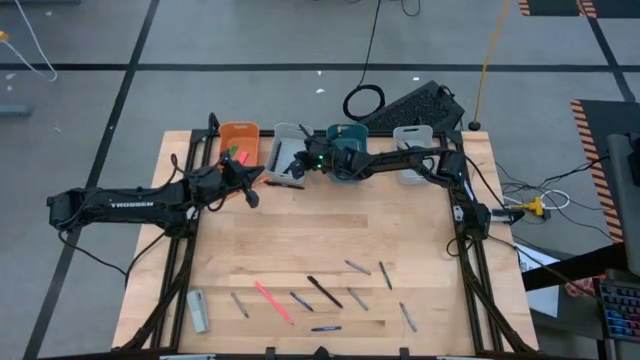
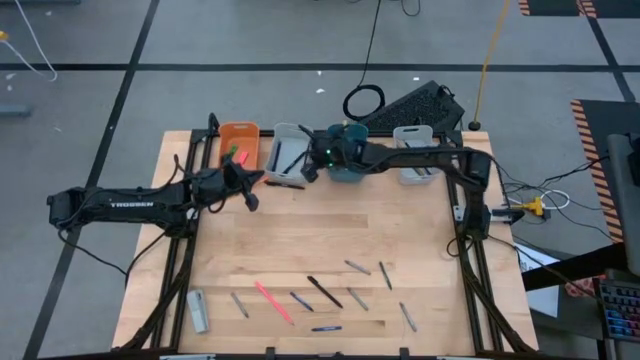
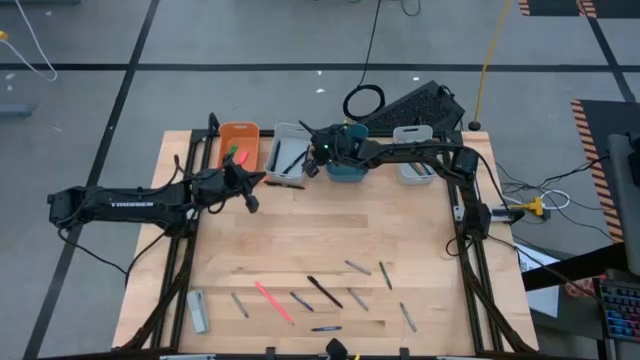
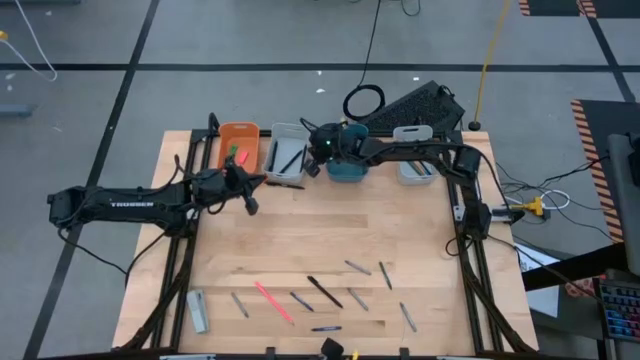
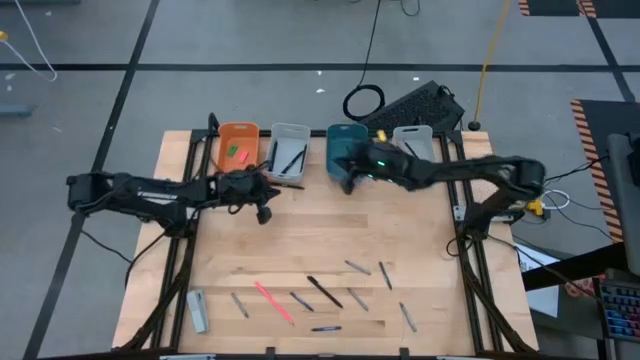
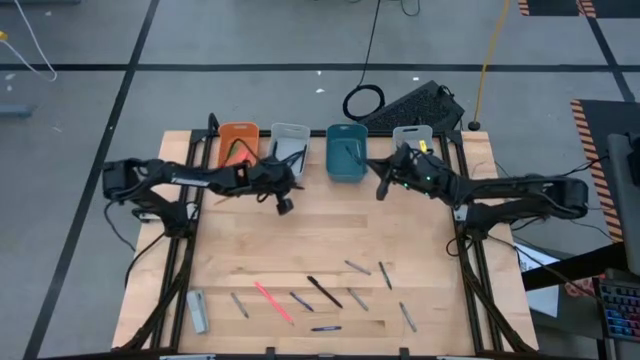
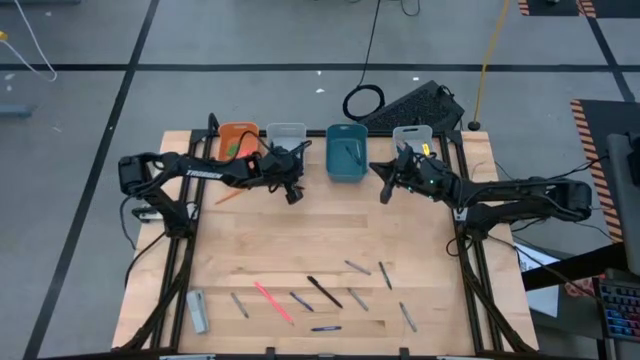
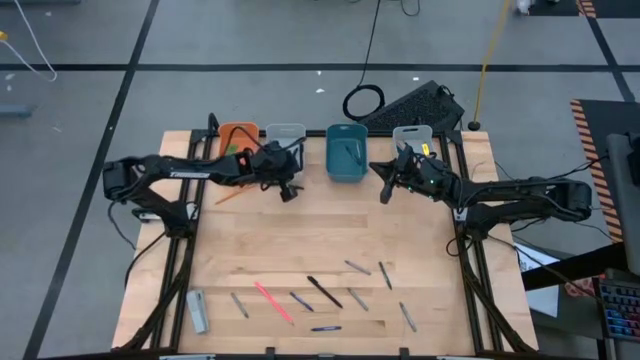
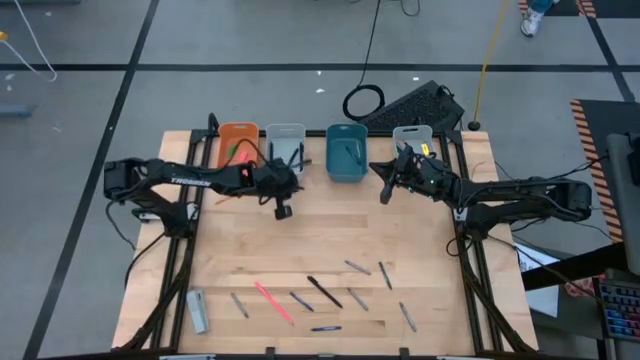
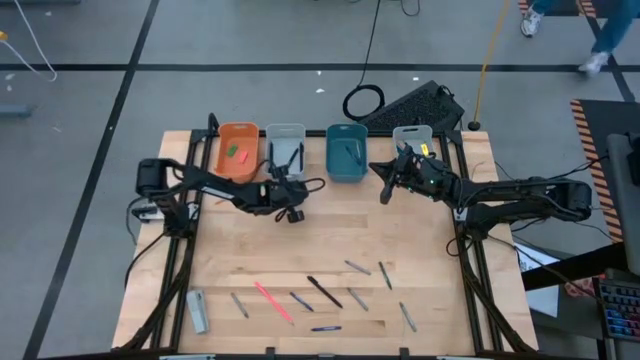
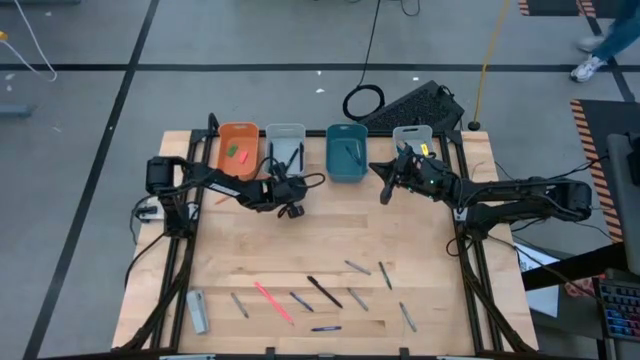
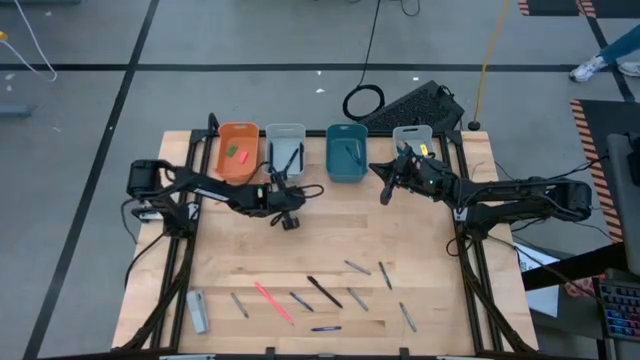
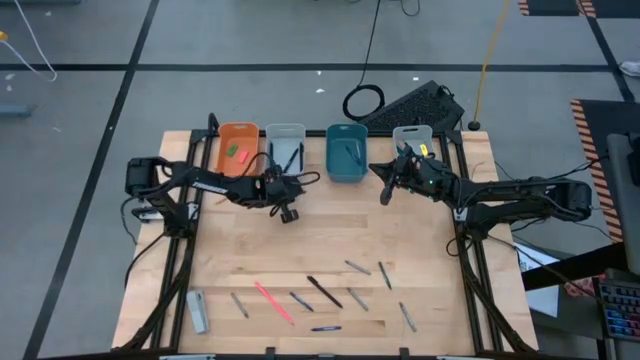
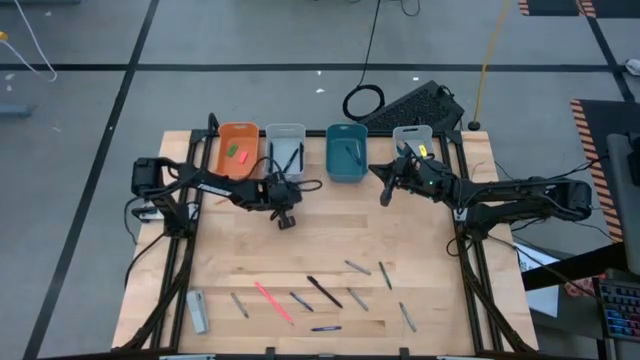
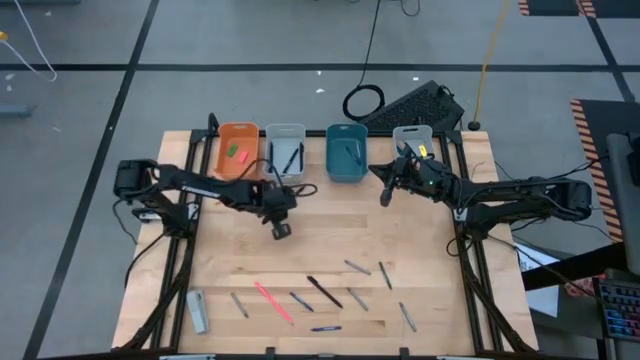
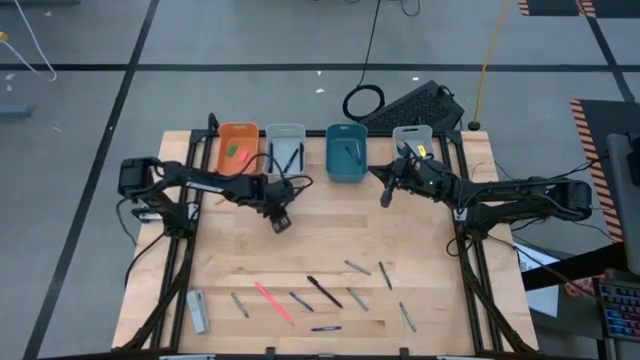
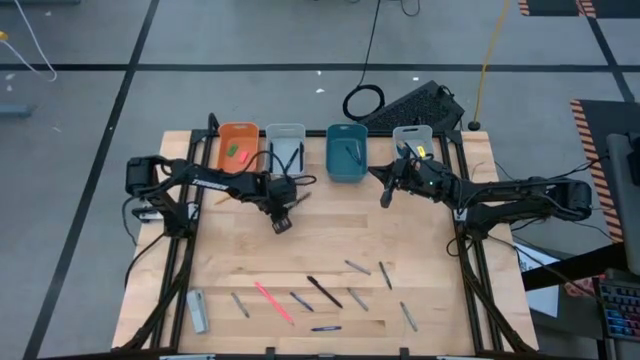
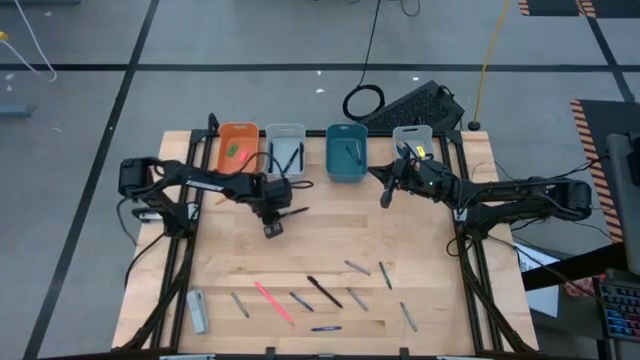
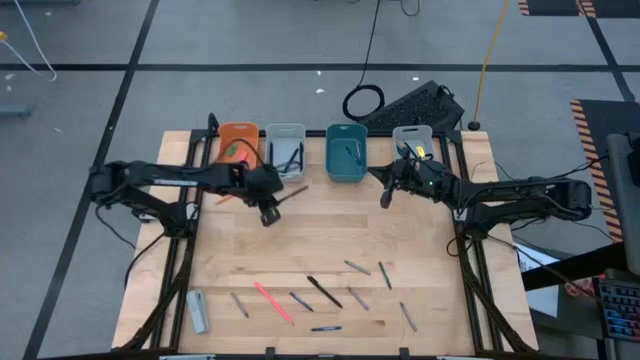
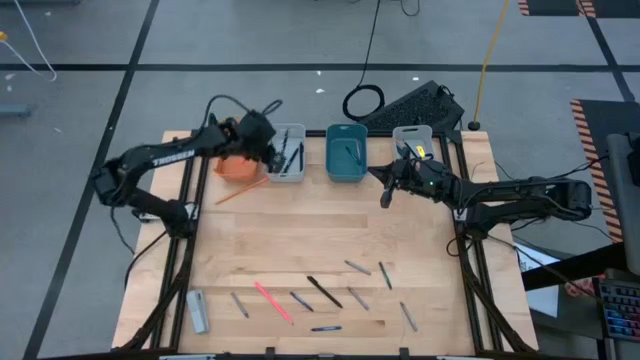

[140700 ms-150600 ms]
Task: Sort crayons/erasers/pens/pencils in bins
Put the black pen into the left gray bin

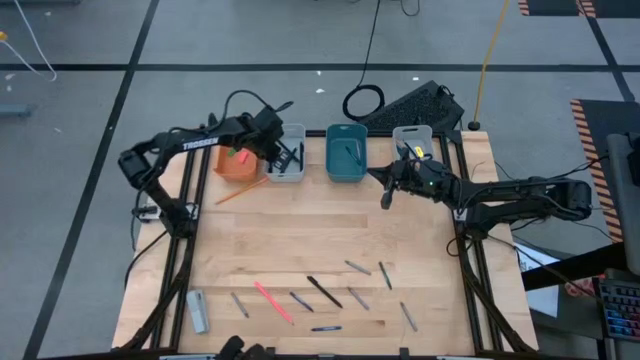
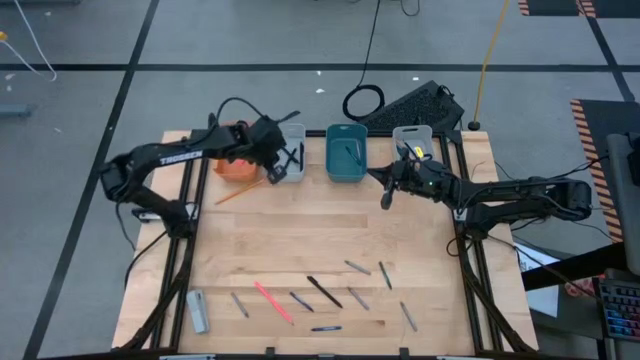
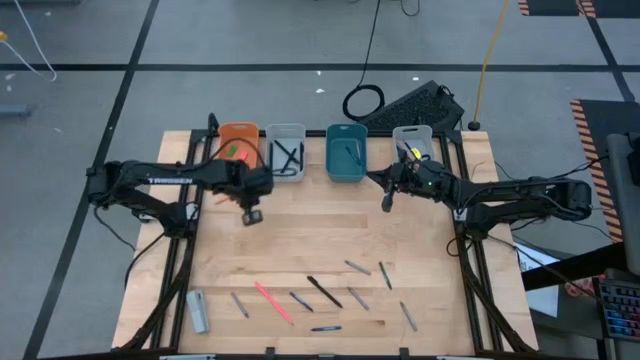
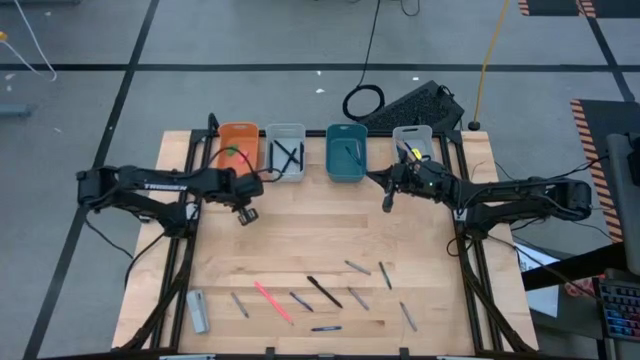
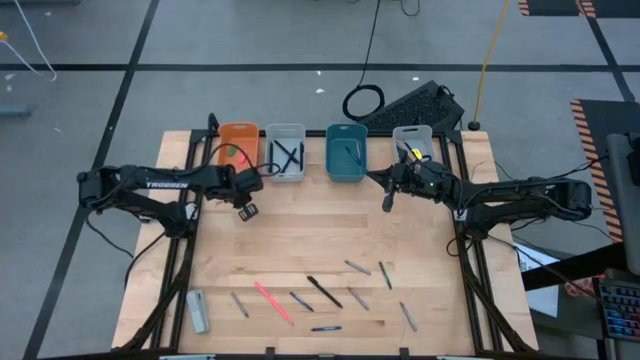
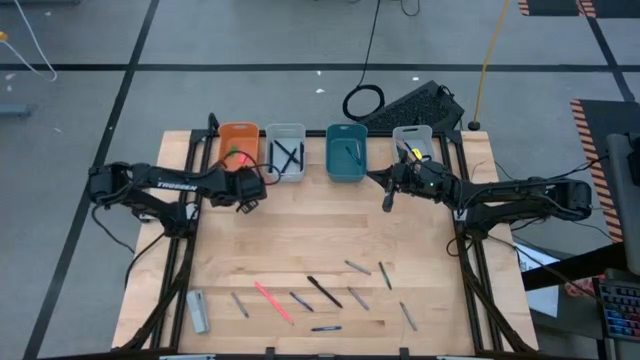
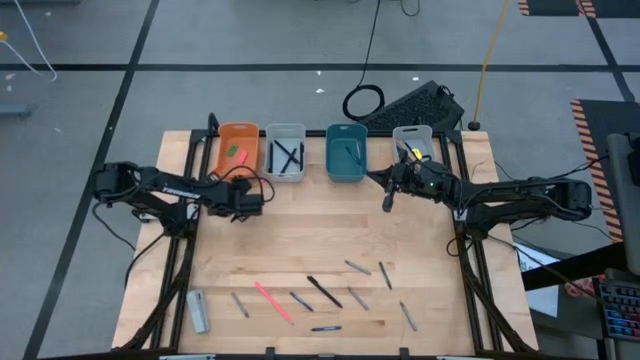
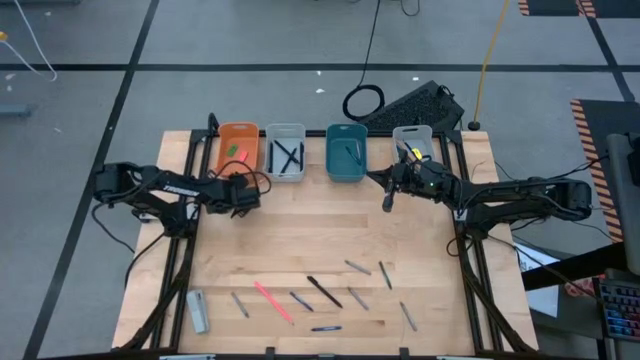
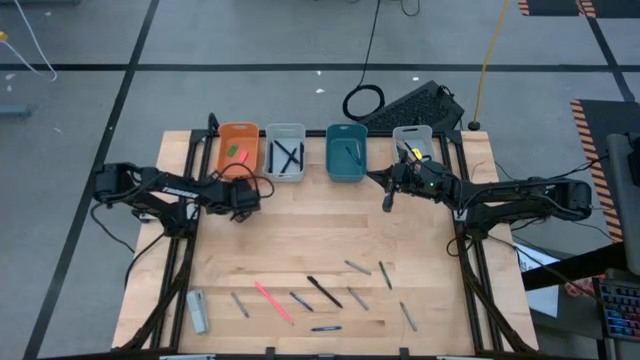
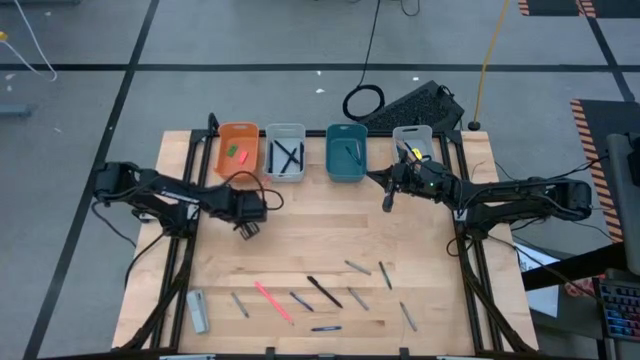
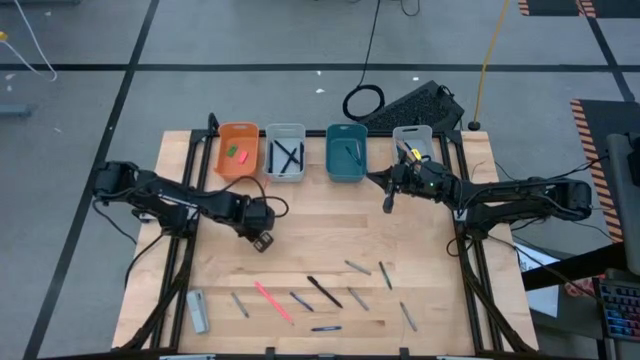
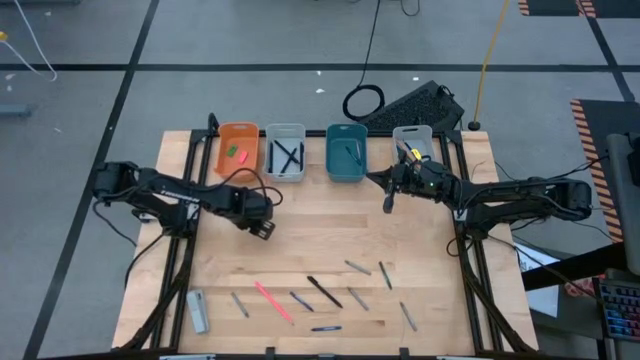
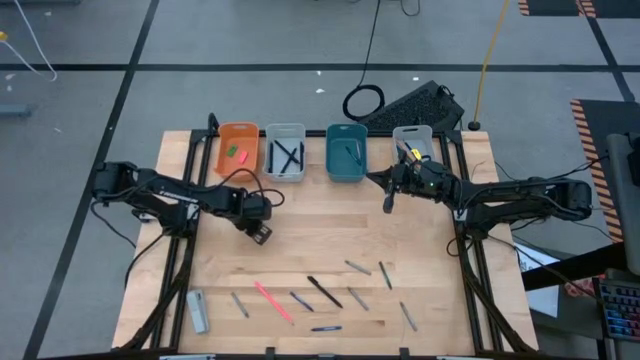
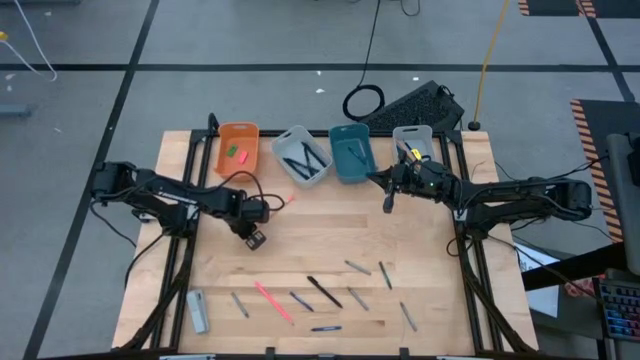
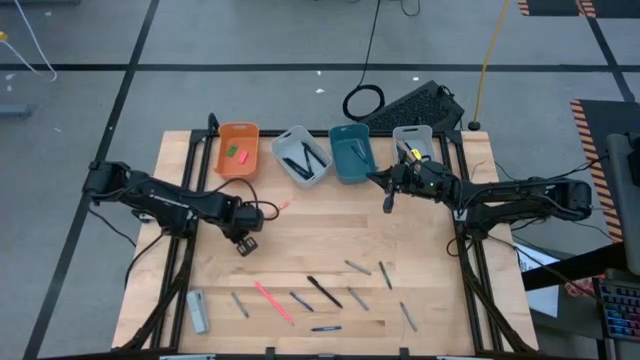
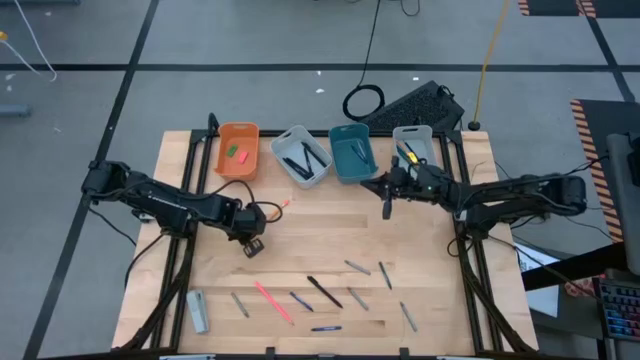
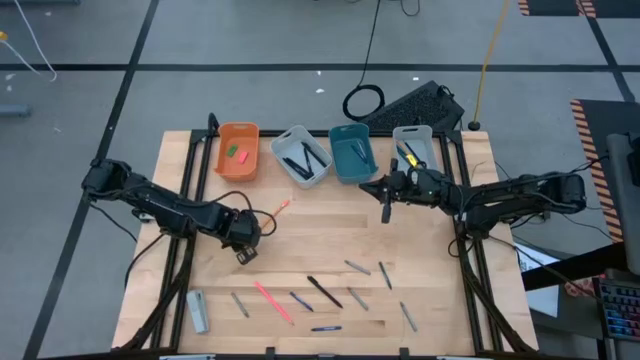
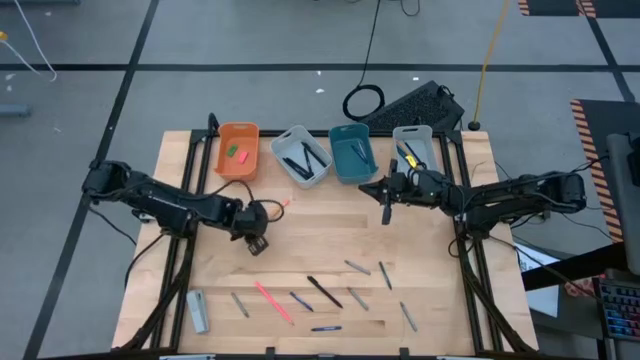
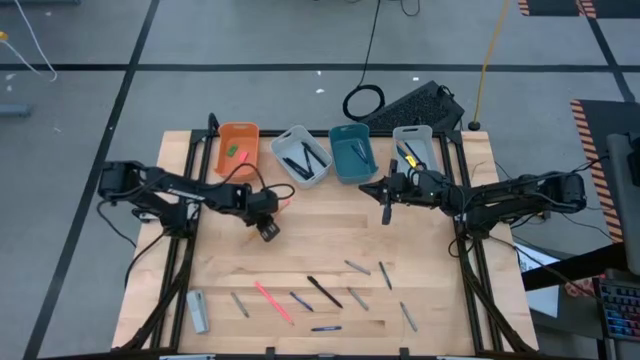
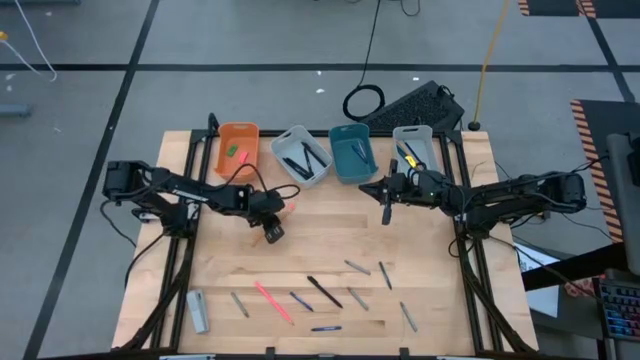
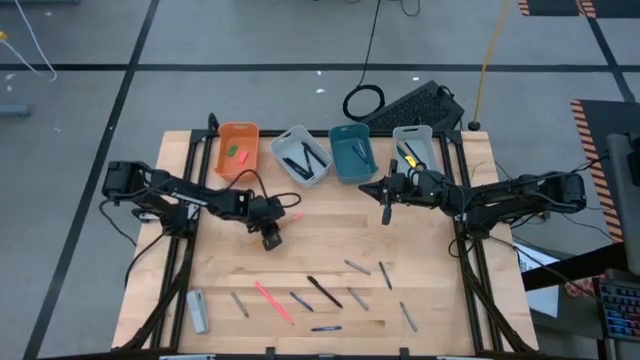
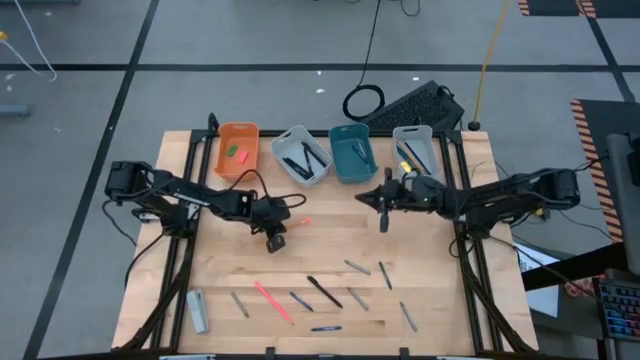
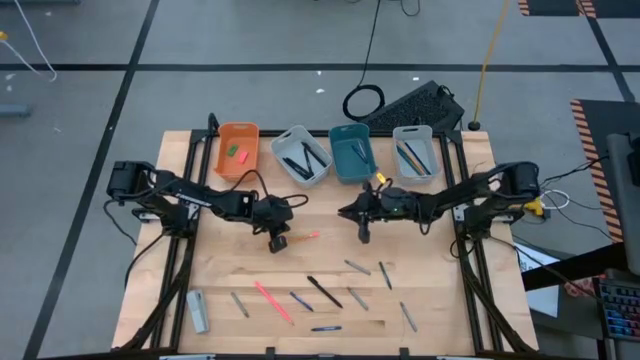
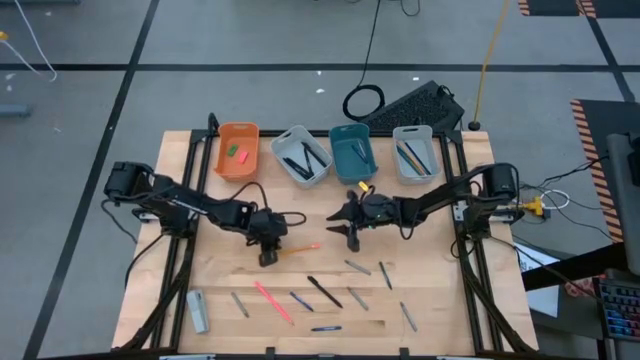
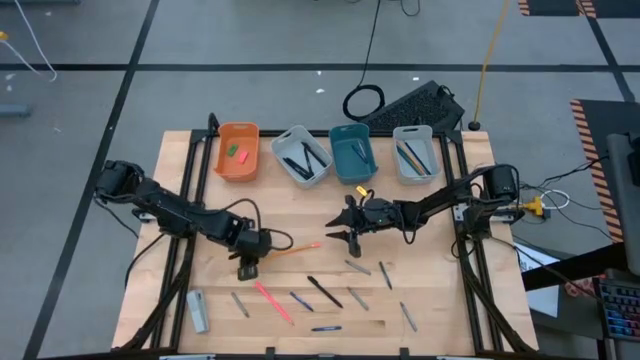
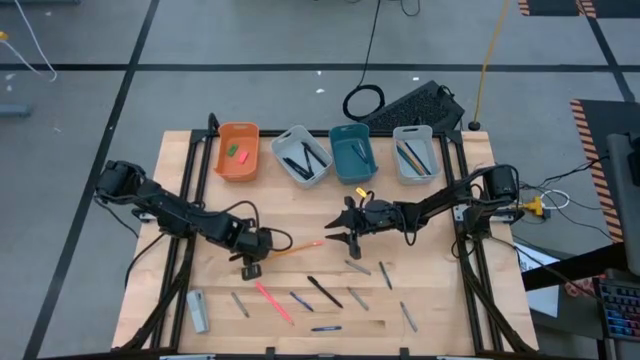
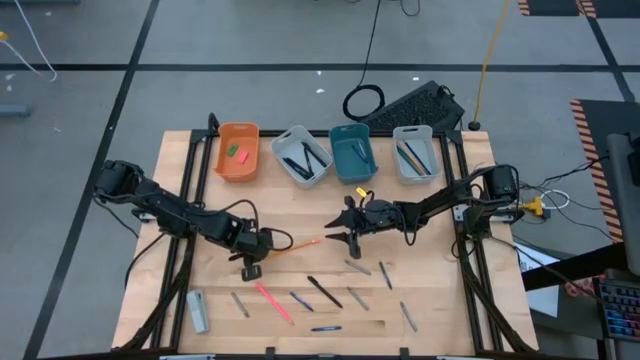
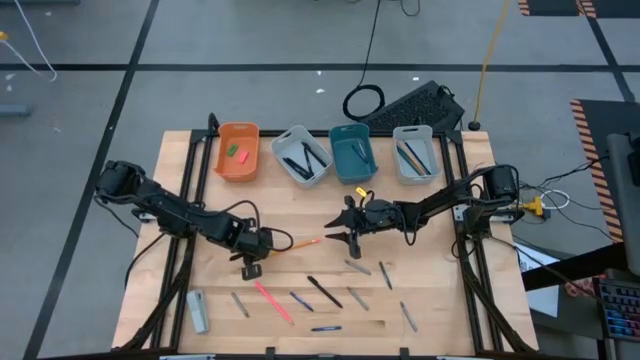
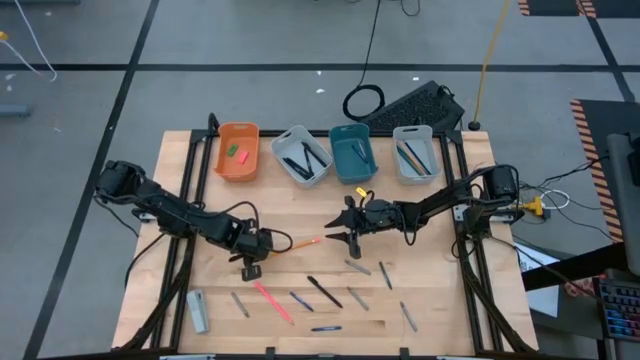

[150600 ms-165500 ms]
Put the orange pencil into the right gray bin
